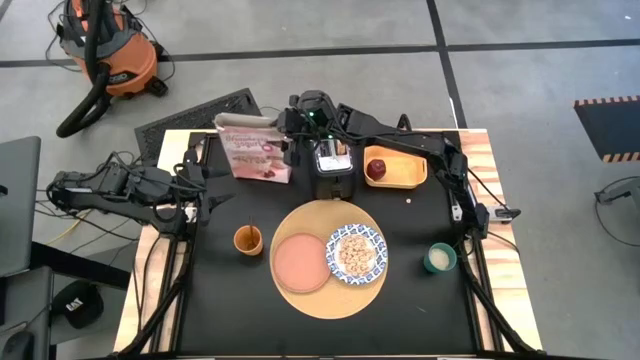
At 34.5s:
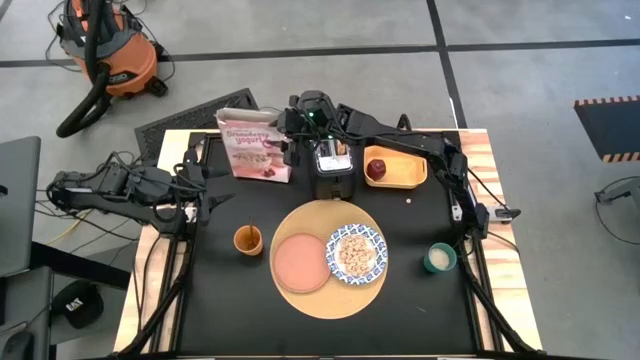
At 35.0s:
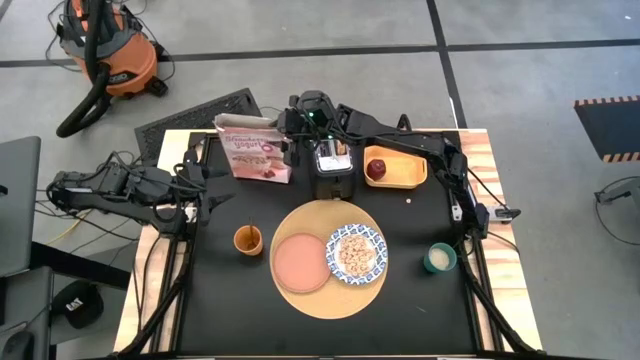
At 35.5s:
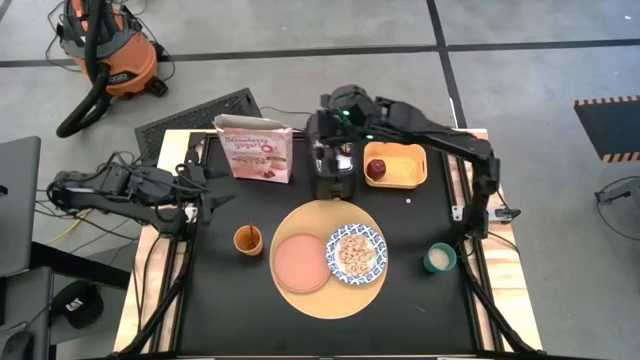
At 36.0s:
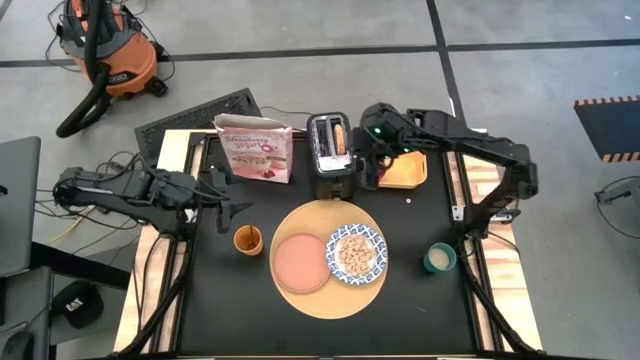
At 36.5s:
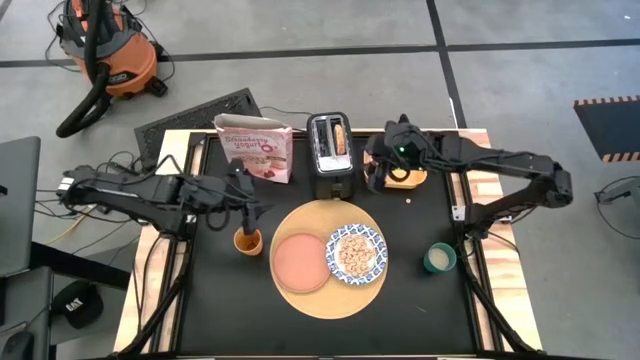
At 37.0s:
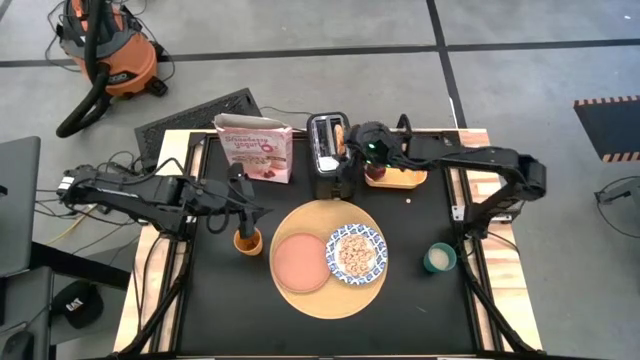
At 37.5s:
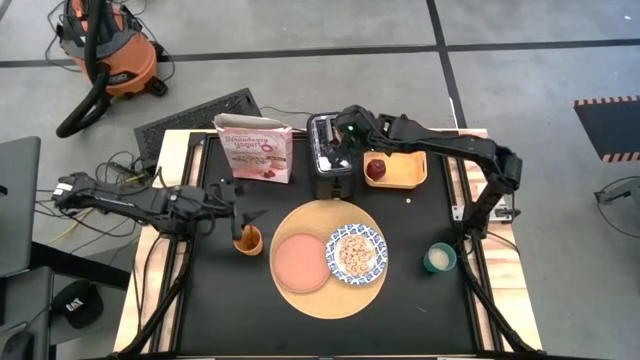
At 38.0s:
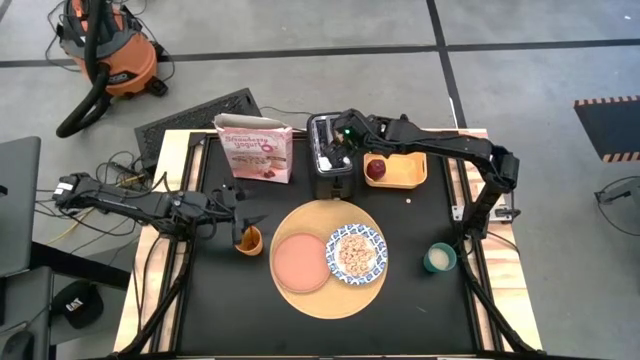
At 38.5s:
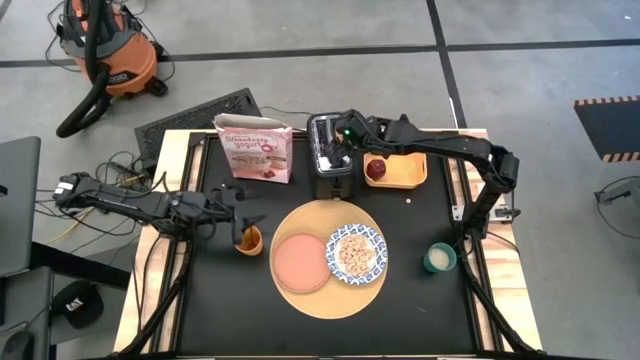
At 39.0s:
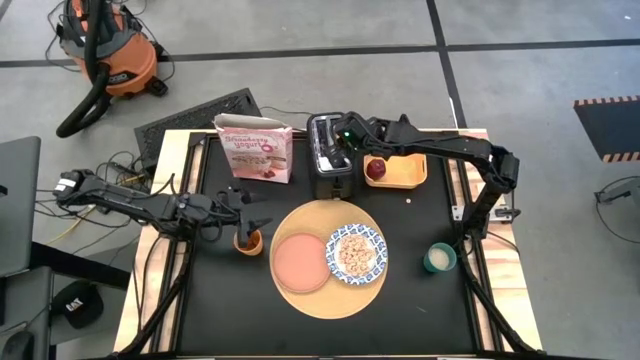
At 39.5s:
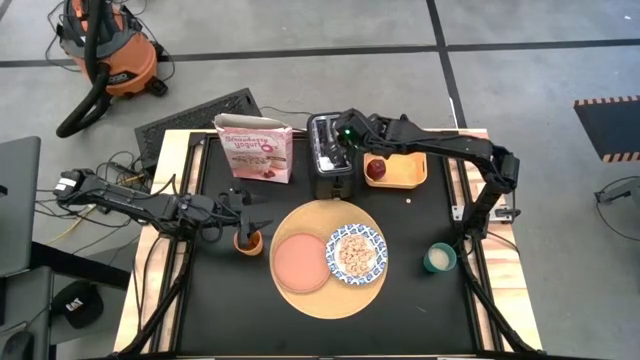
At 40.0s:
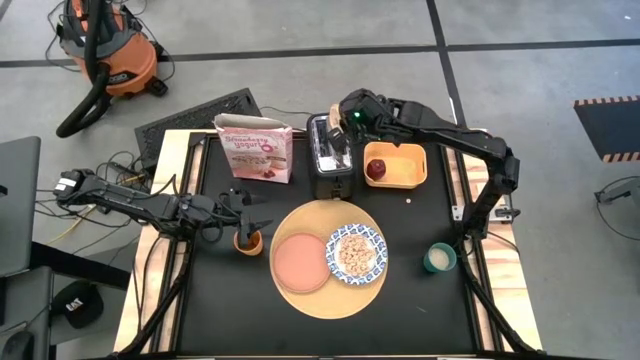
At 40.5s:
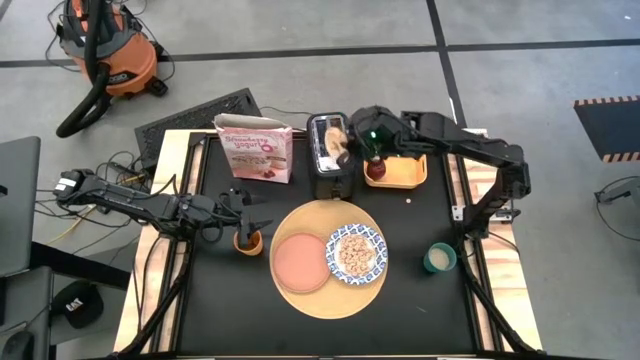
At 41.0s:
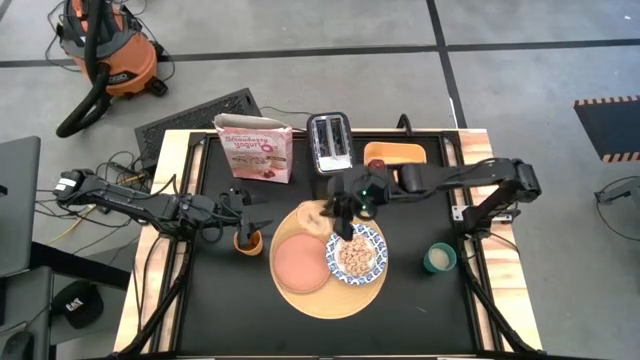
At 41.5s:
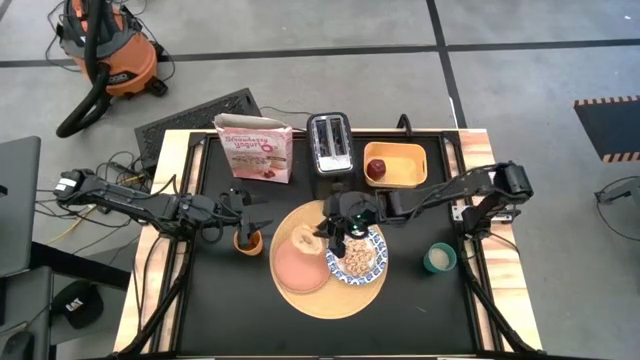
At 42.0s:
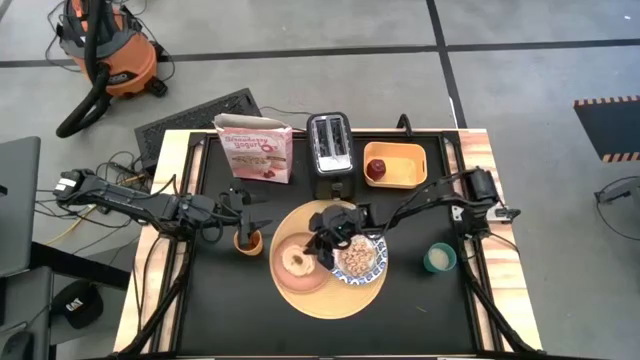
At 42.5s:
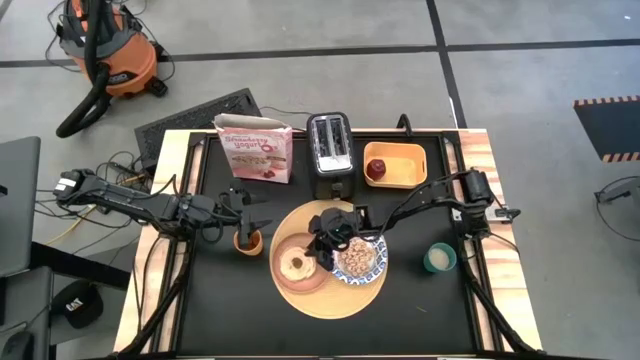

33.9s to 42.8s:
Task: Arrange a breakfast setting
Put the toasted bagel on the plate

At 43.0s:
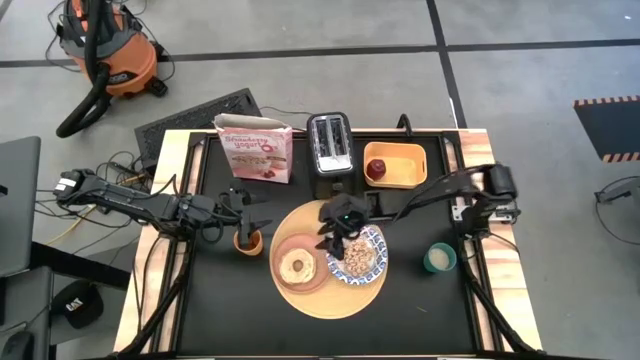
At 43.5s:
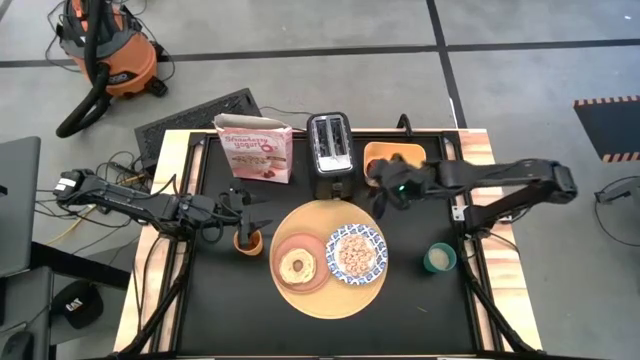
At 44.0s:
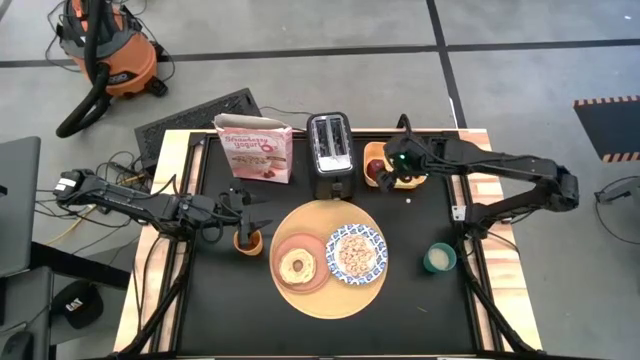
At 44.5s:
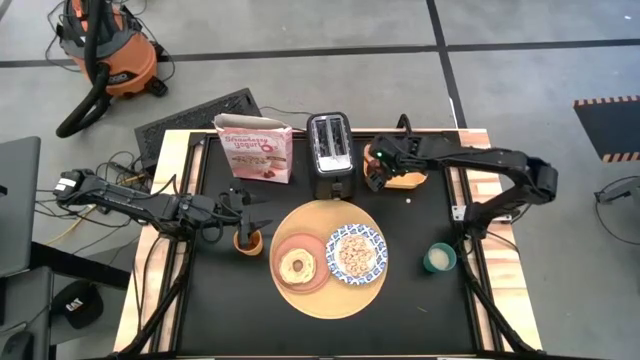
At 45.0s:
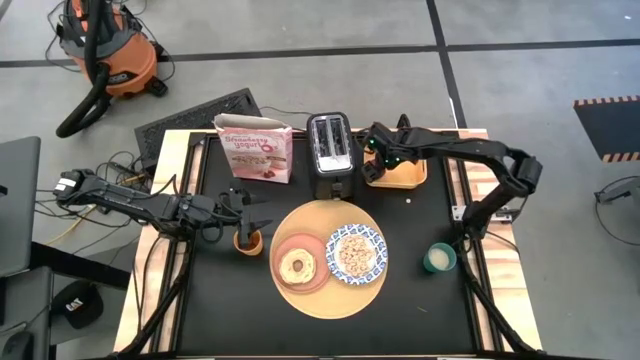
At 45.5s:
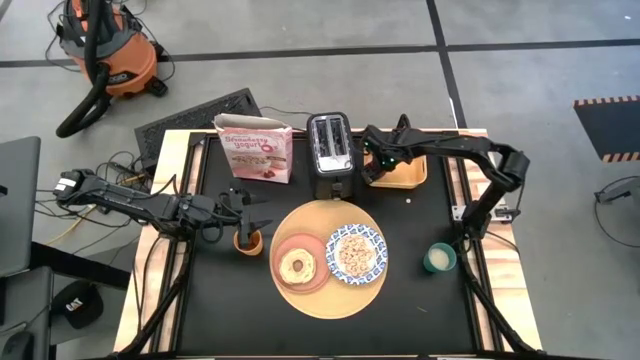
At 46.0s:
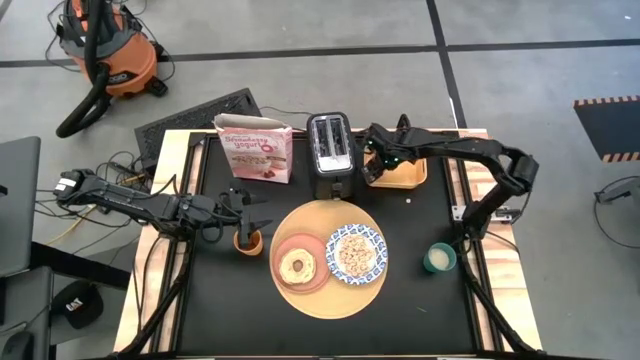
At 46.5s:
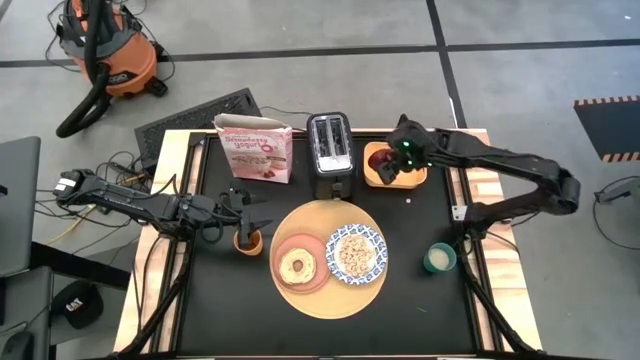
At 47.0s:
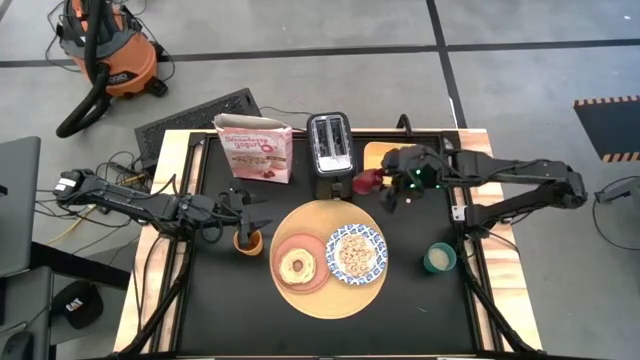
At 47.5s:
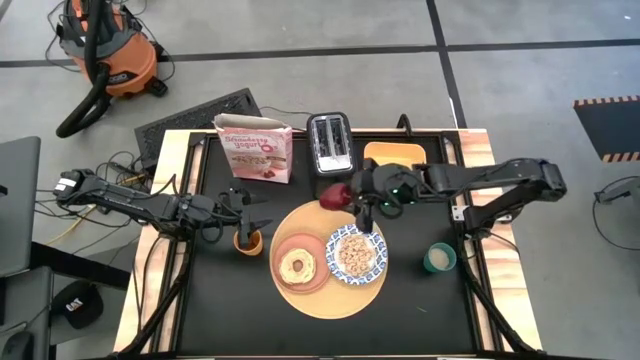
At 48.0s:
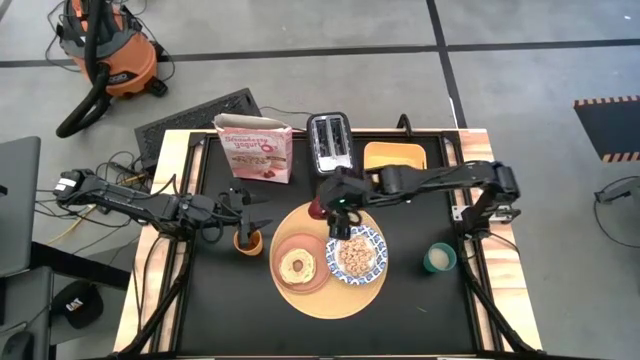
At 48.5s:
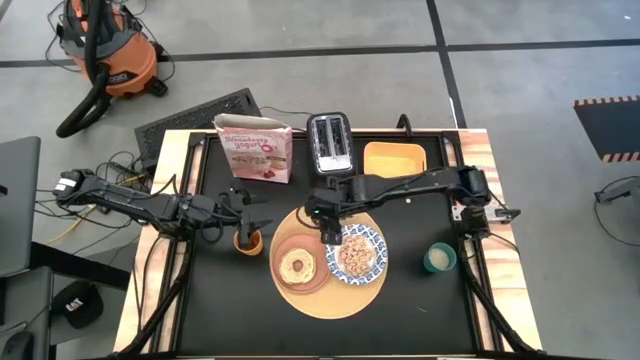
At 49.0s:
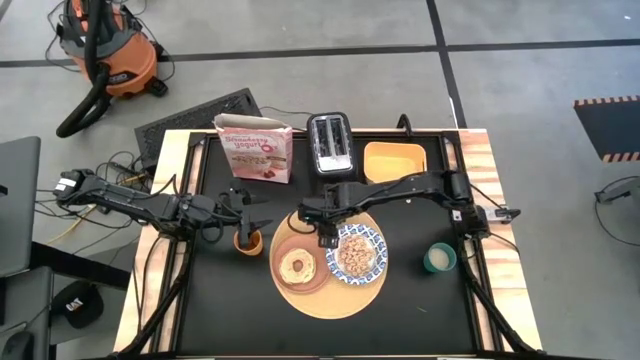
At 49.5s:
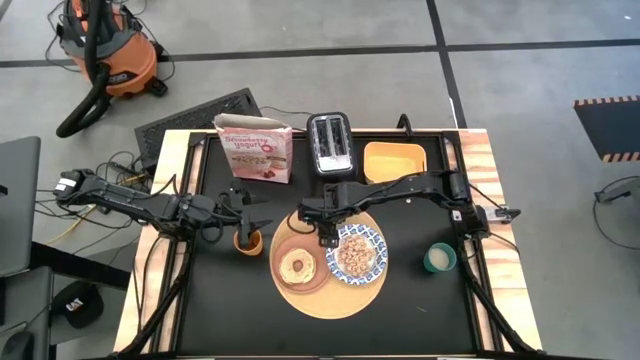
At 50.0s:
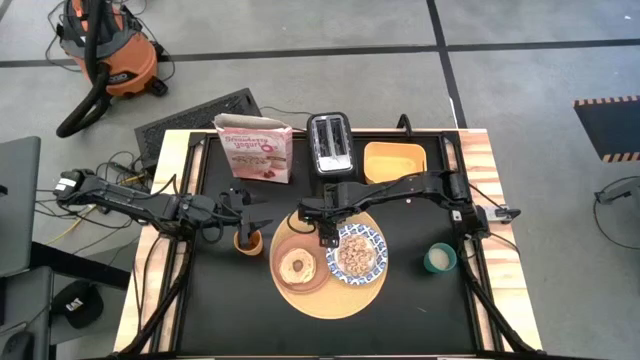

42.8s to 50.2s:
Put the apple on the table mat

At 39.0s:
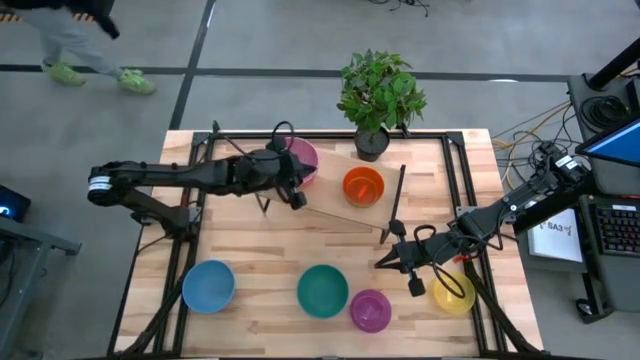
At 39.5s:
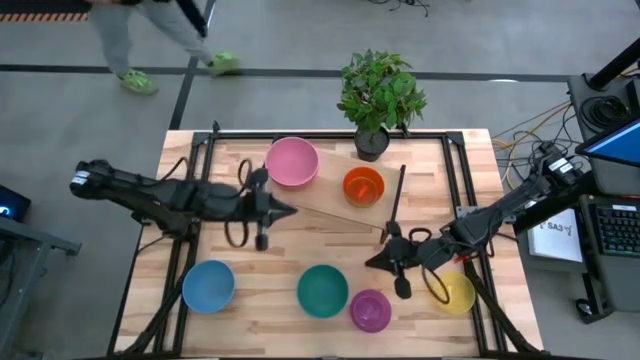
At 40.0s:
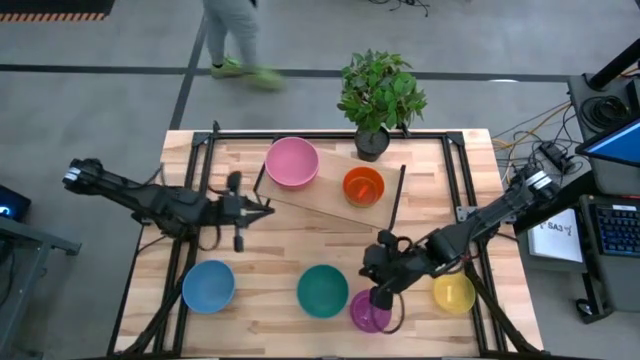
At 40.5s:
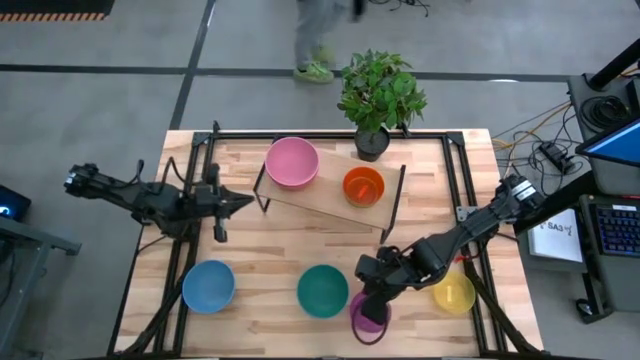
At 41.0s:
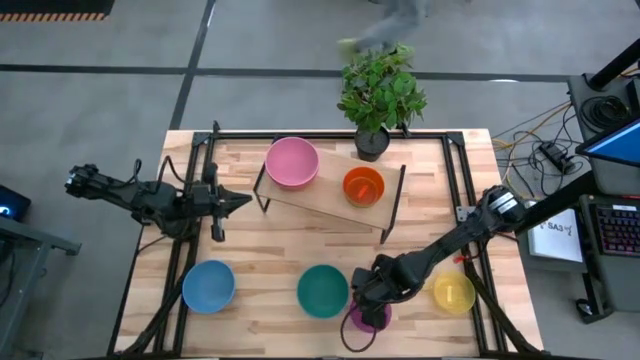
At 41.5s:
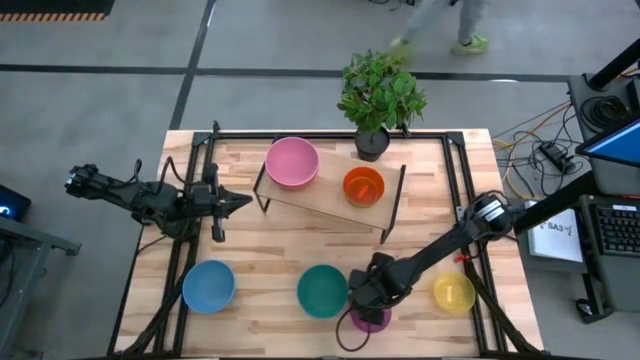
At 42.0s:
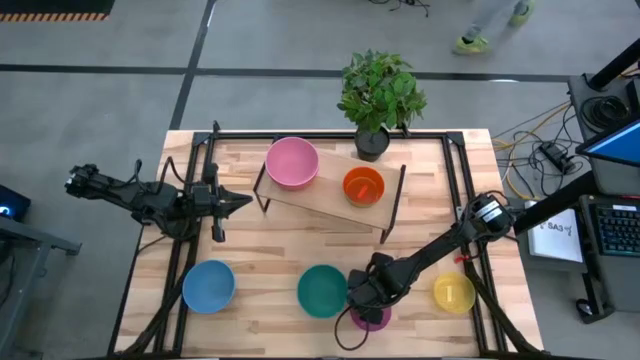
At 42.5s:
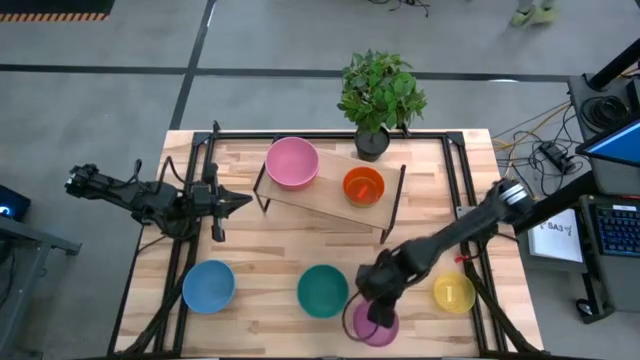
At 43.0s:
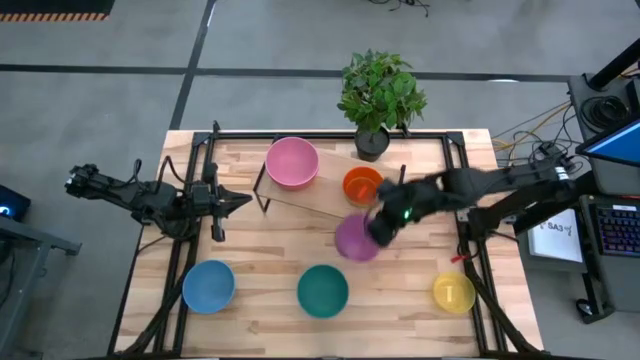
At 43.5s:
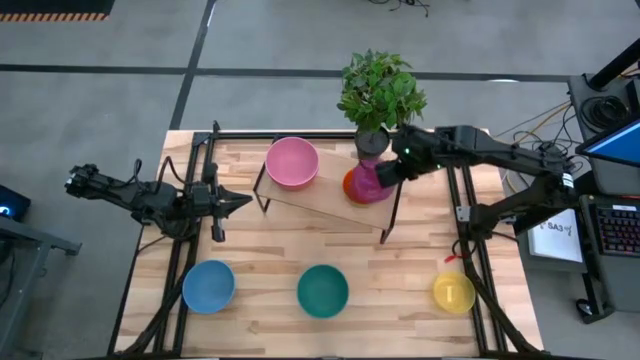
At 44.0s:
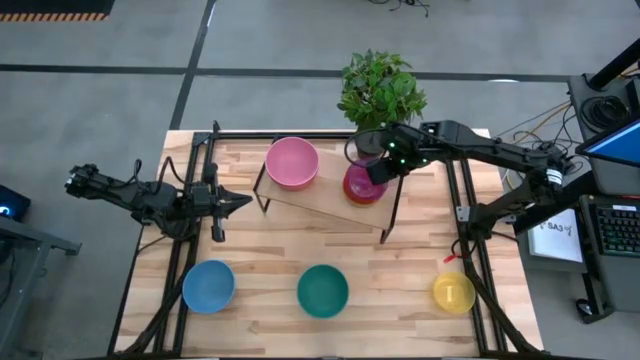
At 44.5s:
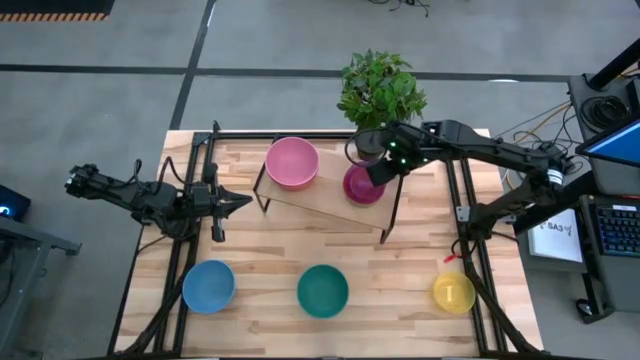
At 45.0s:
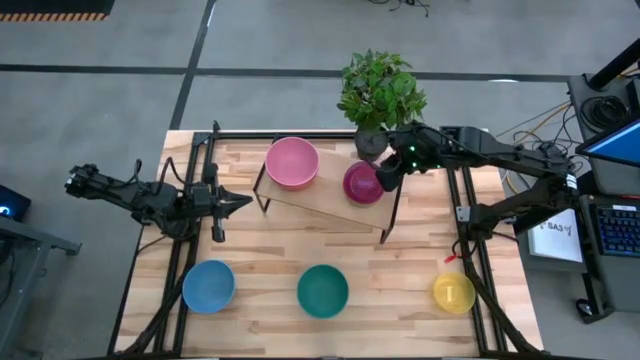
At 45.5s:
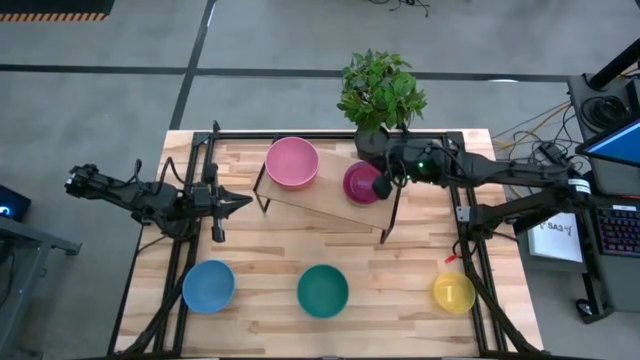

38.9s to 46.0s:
Task: Place and stack bowls onto a shelf
Stack the violet bowl on top of the light orange bowl on the shelf
